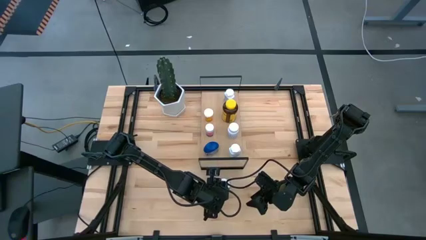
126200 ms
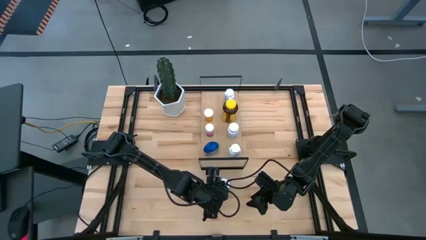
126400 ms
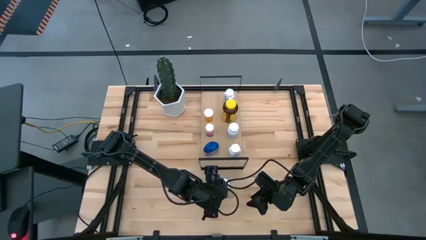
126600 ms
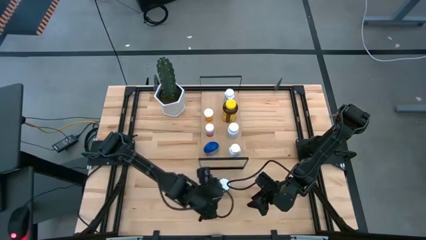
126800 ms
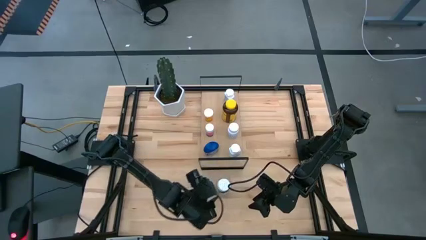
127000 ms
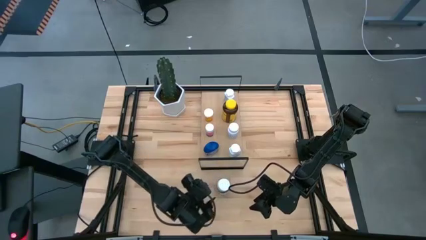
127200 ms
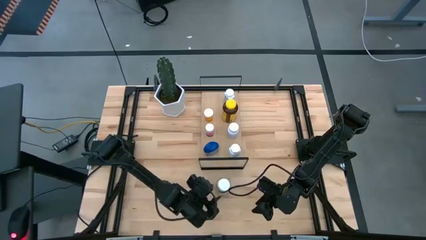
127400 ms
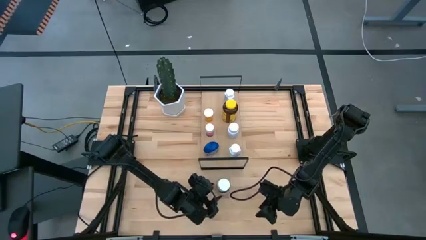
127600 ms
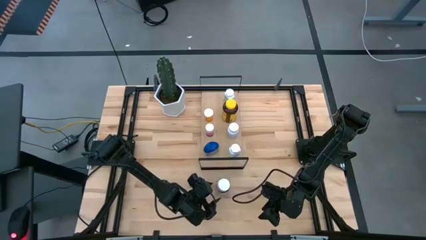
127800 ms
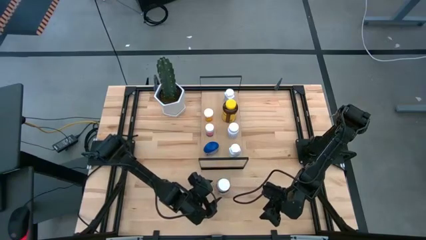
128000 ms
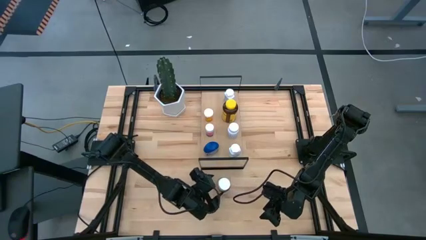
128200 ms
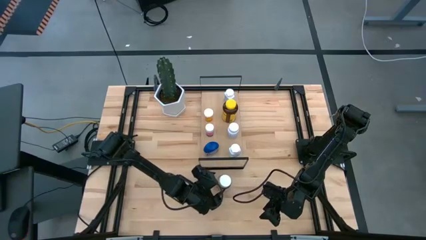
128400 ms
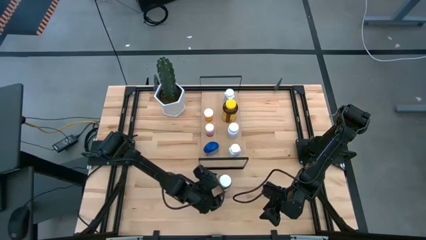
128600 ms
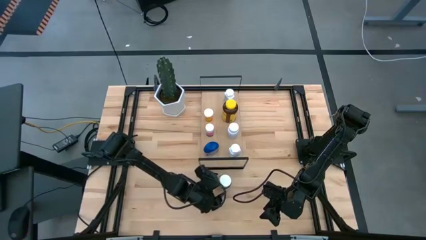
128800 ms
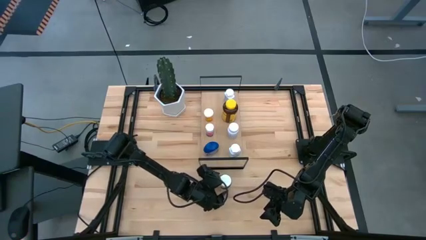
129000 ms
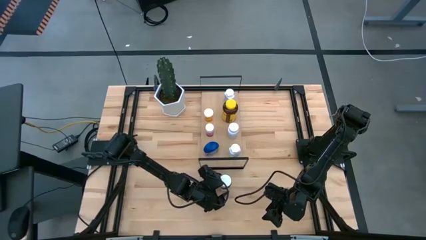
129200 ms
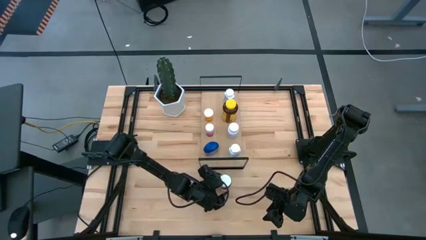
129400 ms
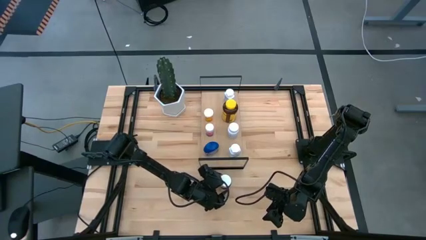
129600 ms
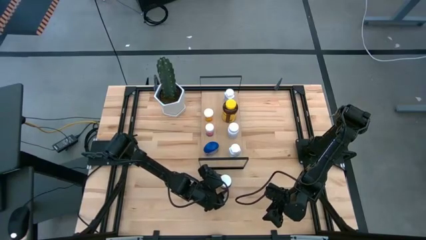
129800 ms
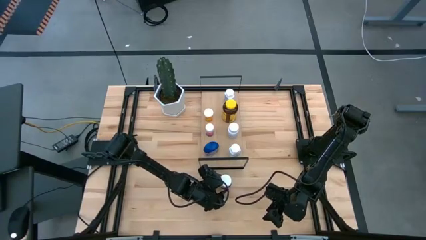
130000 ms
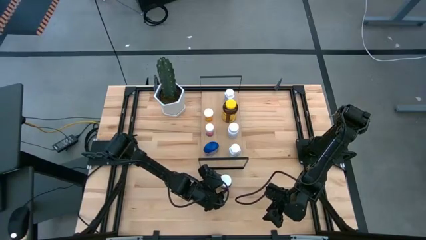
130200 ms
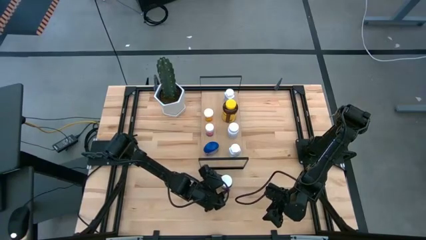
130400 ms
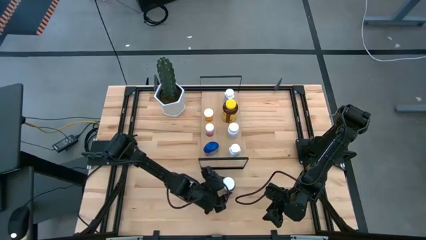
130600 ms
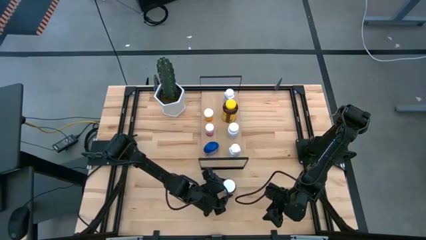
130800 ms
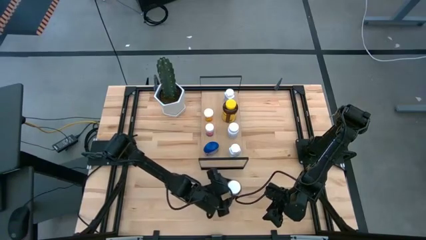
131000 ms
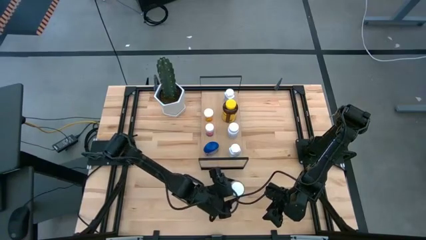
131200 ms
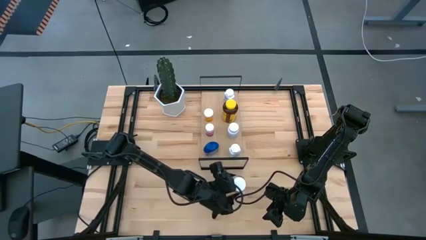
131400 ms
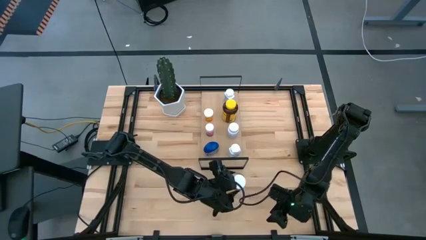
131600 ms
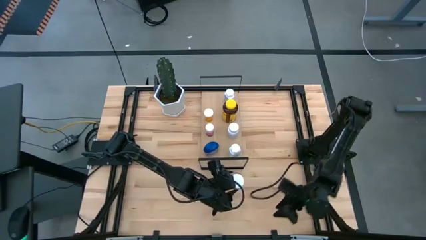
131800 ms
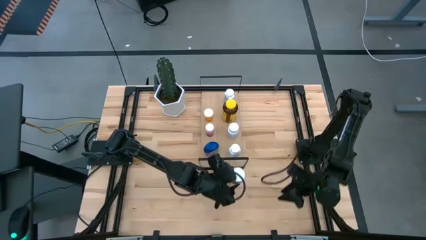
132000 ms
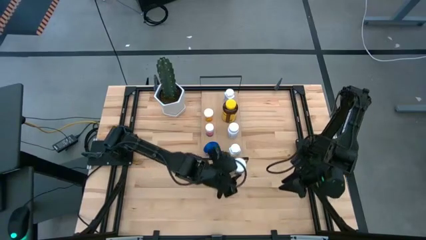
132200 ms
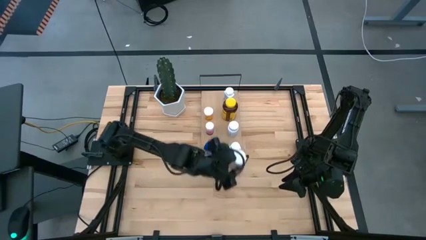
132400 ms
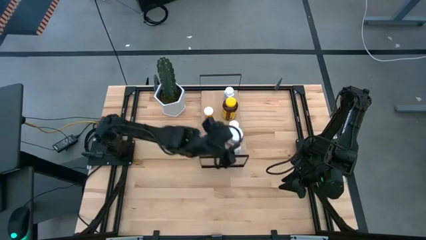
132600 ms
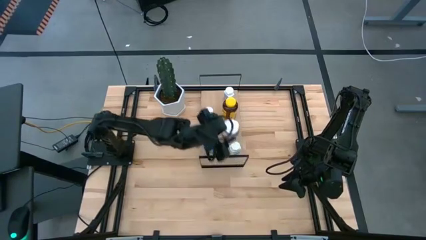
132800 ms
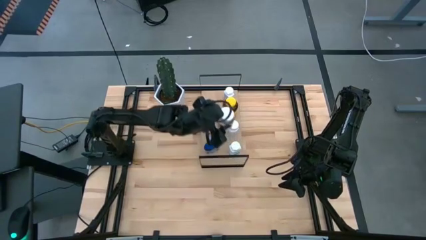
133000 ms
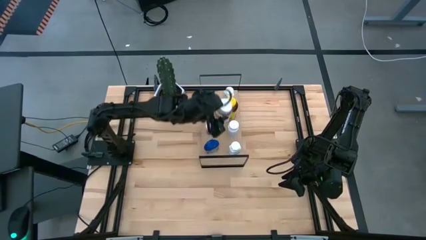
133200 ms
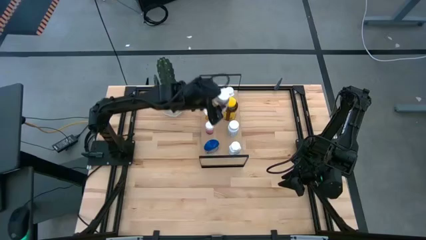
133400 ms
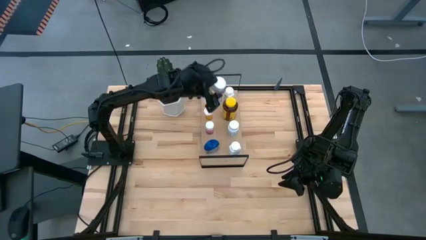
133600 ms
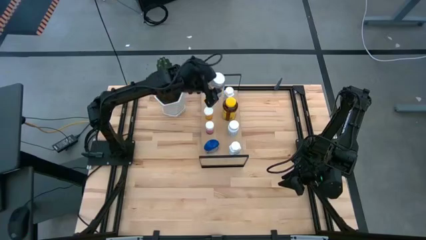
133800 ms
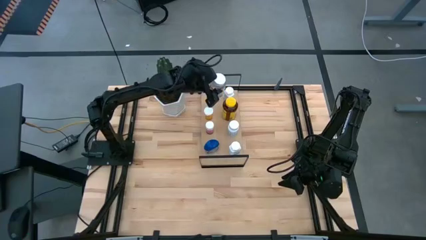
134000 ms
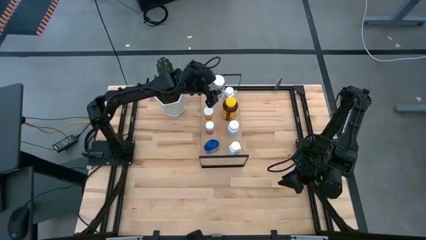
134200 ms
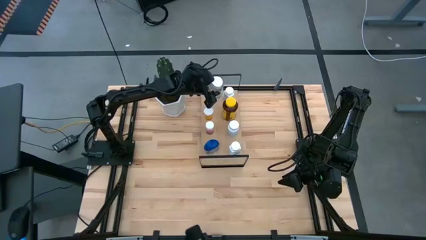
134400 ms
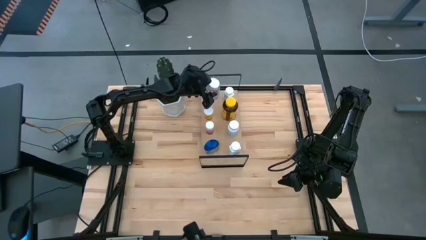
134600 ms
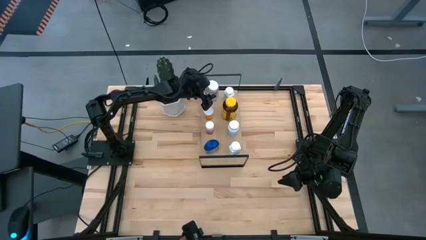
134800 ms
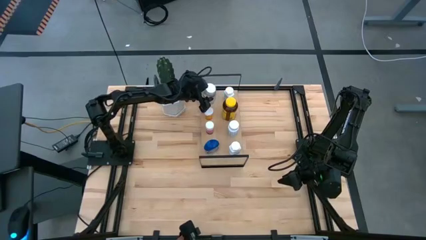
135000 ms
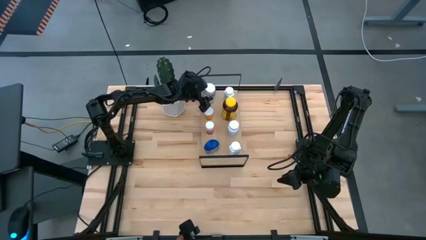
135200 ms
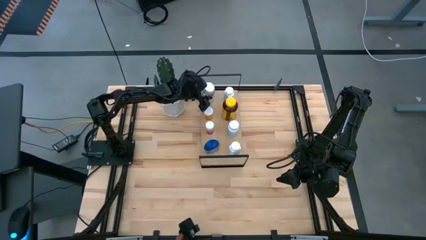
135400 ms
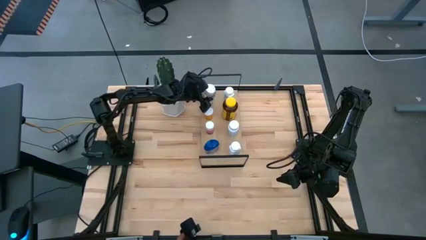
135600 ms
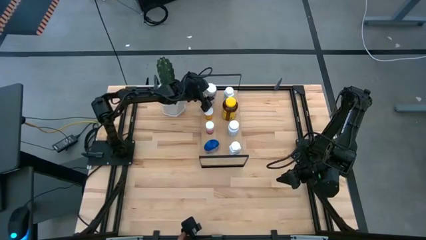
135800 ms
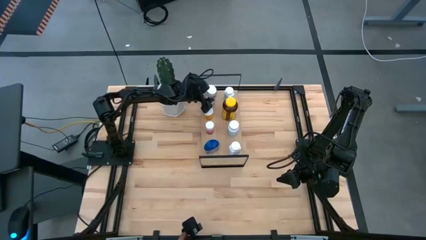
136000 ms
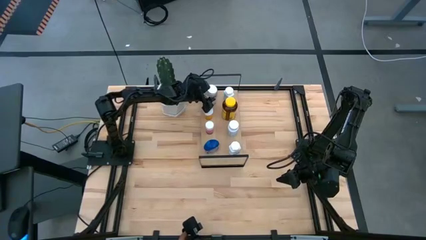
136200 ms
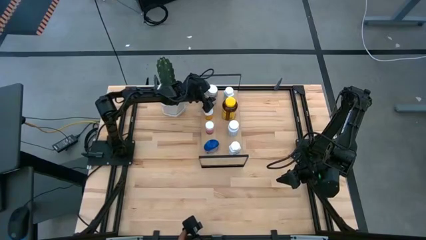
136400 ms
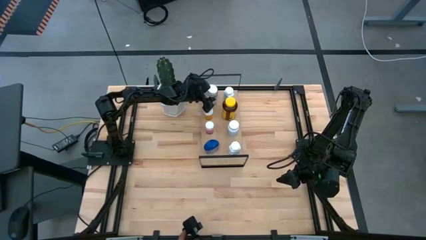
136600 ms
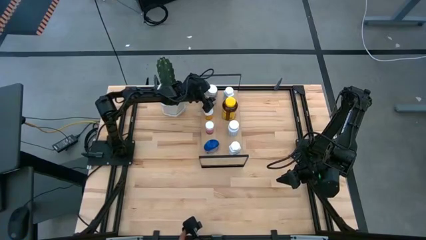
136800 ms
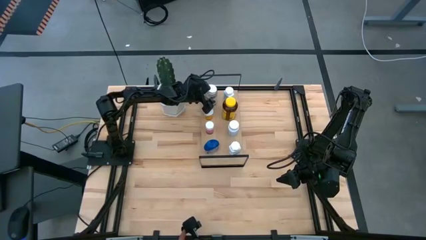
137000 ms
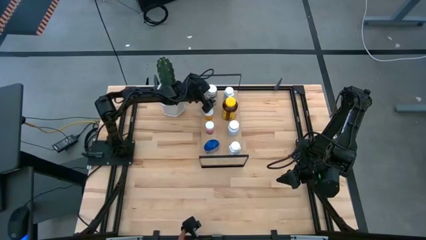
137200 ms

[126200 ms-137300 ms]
Task: Pick and place medicine bottles onto shelf by color
Put the green medicine bottle on the shelf

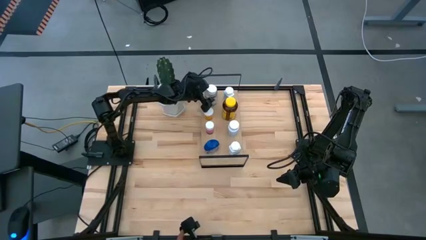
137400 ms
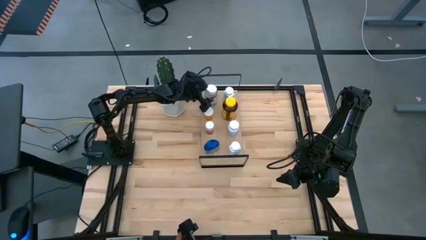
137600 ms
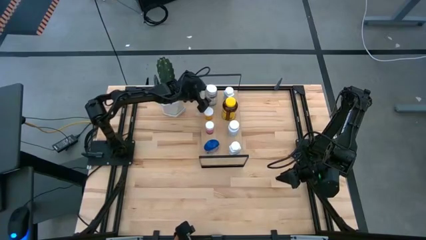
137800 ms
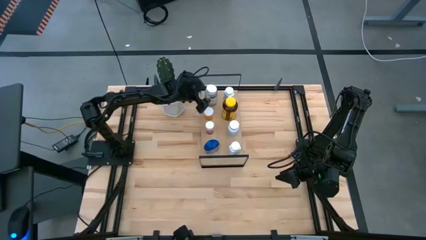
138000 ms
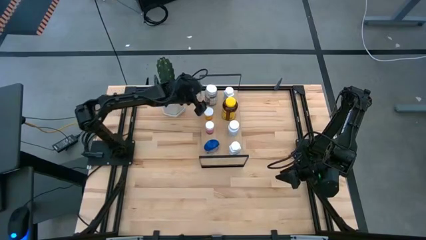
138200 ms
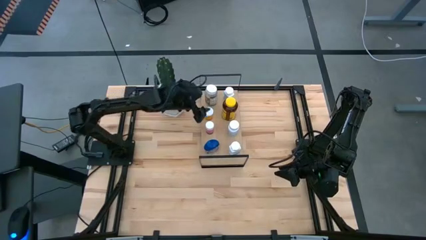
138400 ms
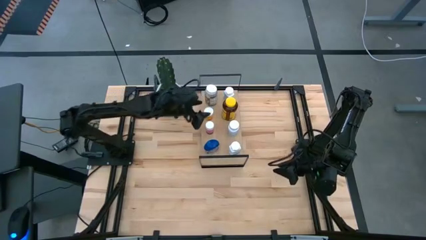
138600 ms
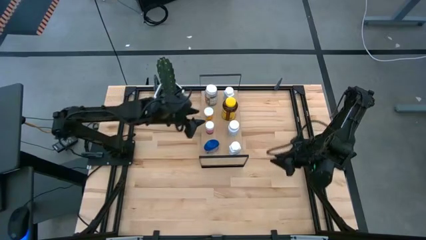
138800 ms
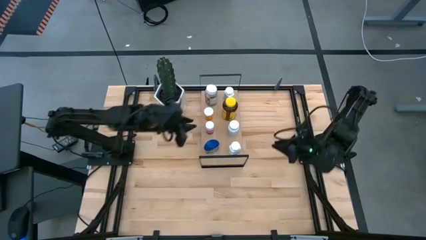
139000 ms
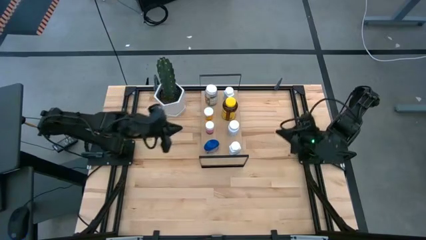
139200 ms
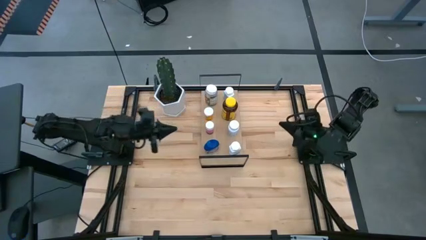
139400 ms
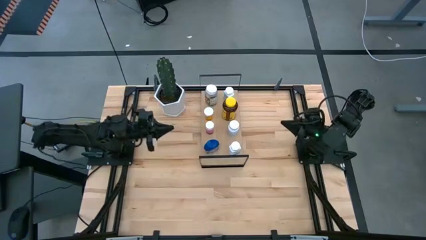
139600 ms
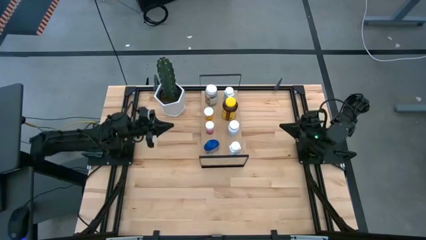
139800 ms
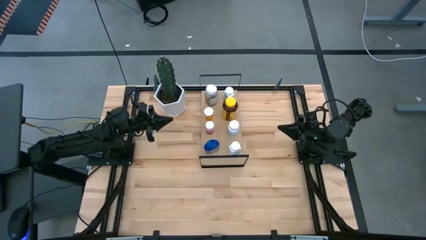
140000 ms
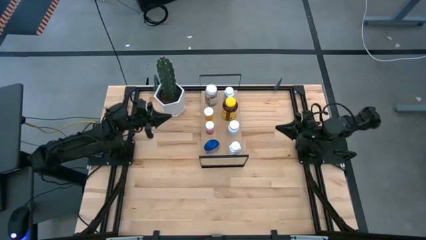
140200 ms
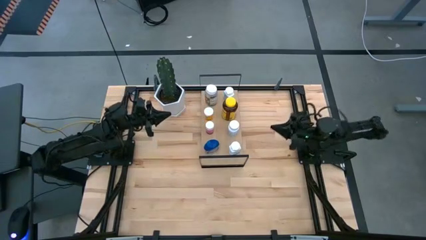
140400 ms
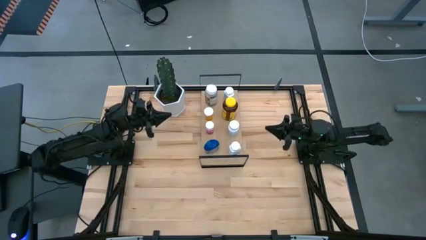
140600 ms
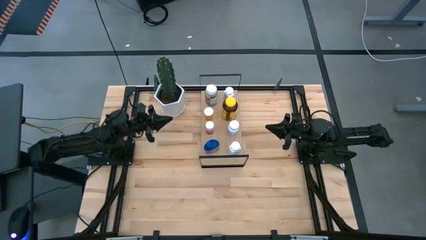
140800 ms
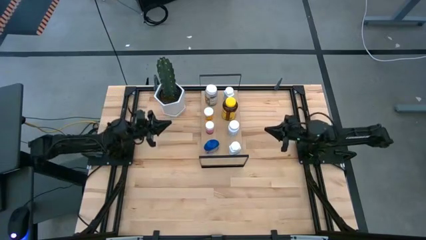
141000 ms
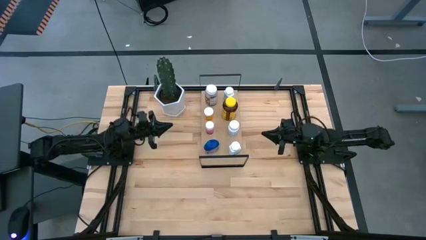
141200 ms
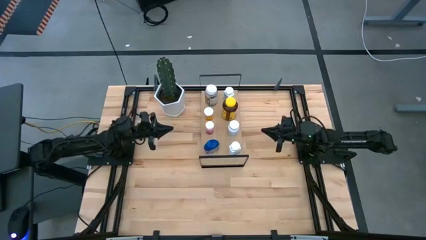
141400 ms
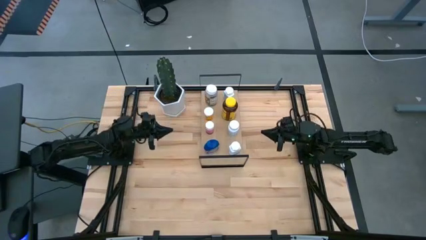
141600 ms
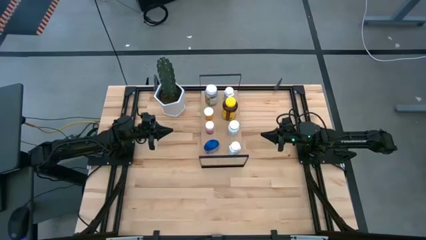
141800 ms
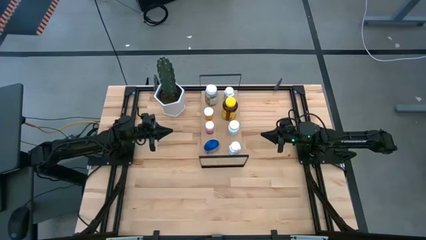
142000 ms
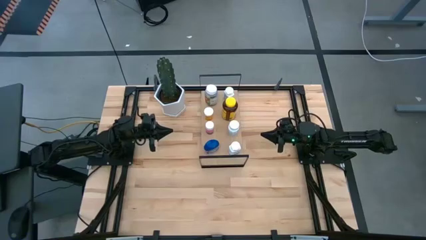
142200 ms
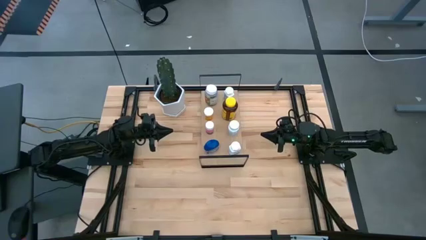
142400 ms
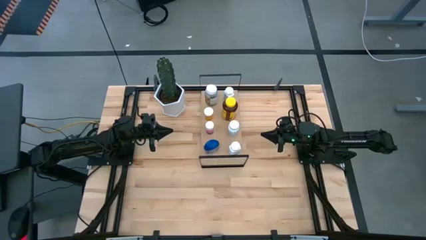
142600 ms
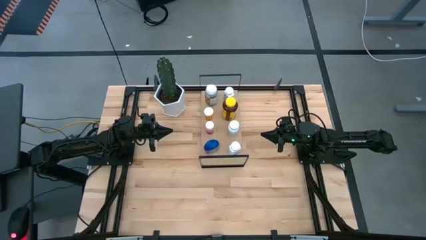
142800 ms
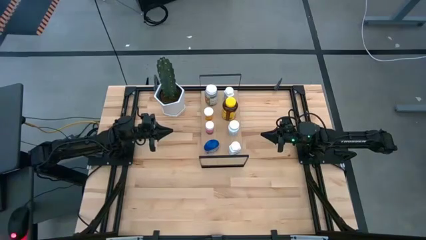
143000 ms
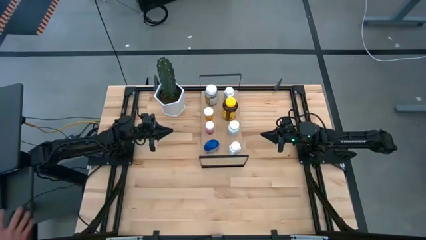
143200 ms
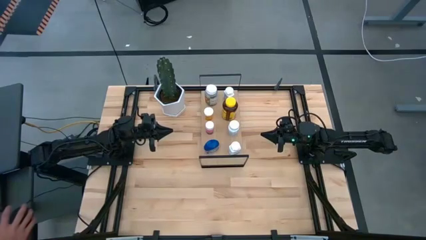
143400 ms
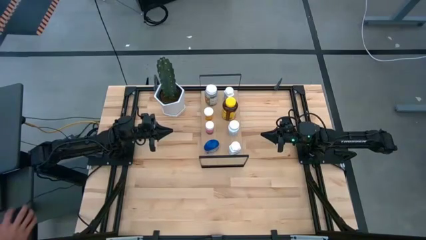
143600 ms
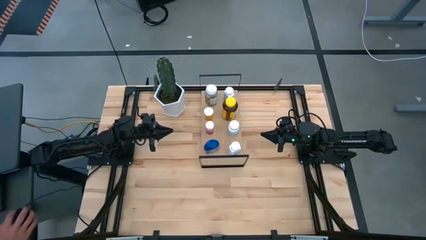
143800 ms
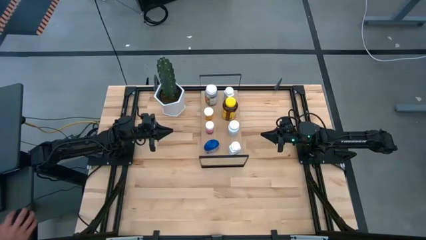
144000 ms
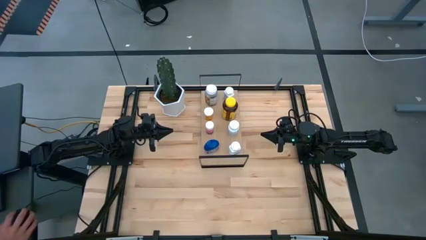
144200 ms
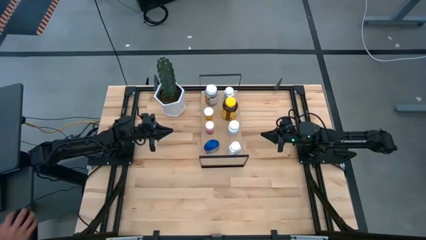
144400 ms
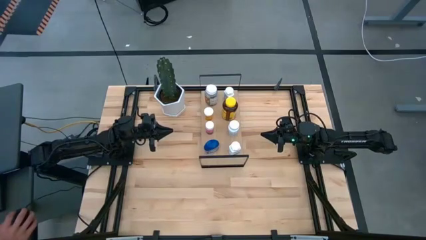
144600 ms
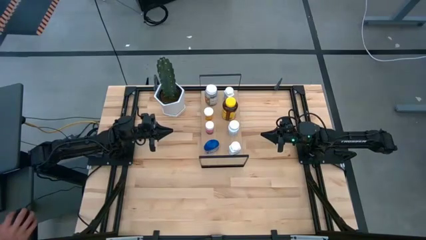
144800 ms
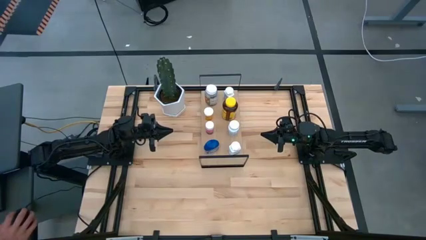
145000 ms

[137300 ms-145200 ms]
Return to Home Position
